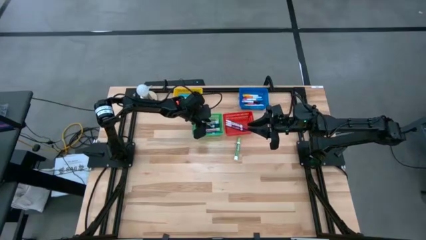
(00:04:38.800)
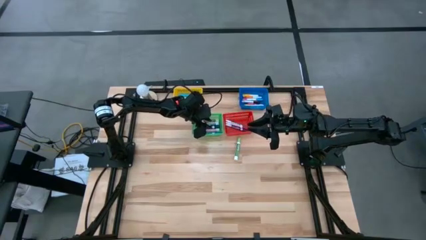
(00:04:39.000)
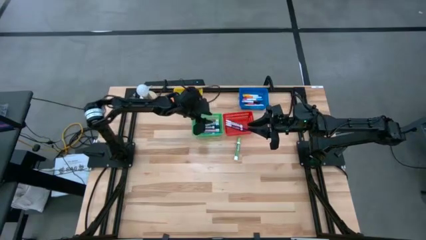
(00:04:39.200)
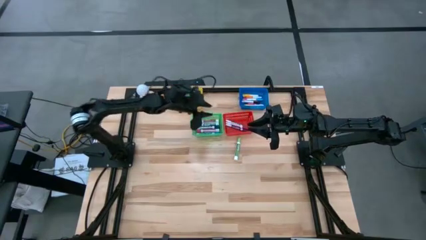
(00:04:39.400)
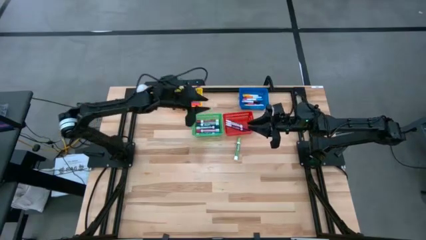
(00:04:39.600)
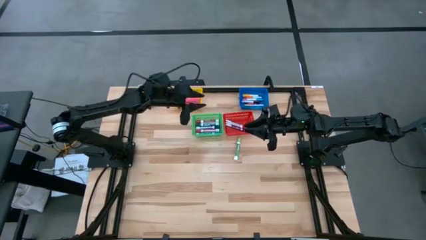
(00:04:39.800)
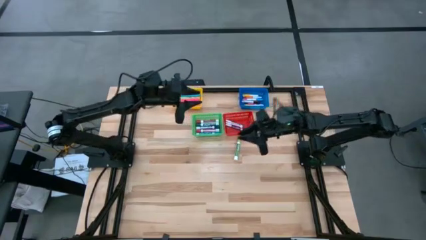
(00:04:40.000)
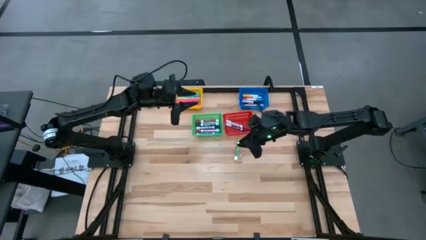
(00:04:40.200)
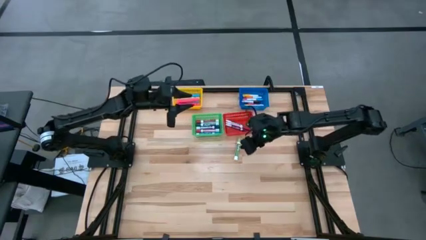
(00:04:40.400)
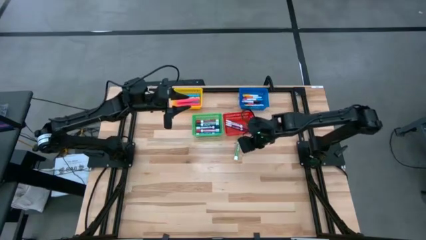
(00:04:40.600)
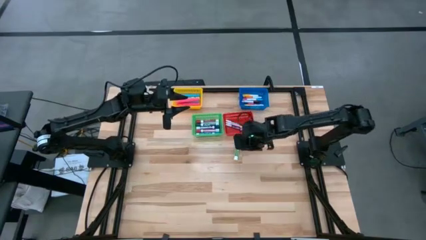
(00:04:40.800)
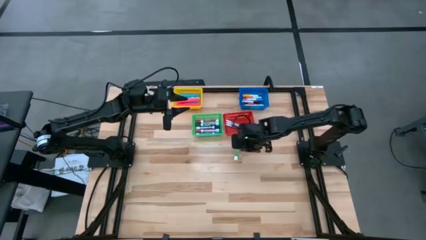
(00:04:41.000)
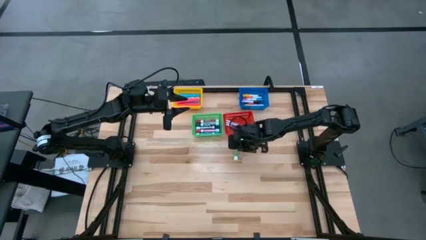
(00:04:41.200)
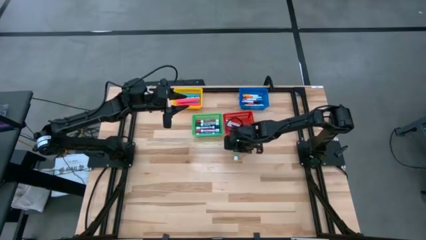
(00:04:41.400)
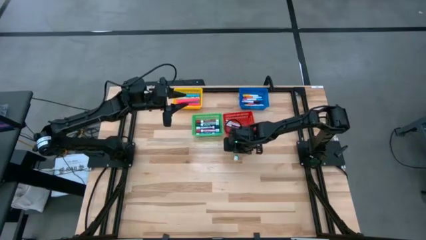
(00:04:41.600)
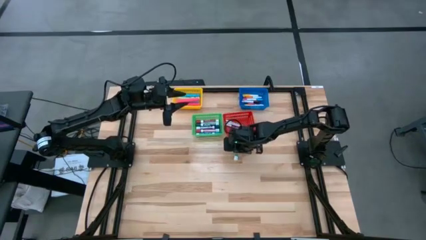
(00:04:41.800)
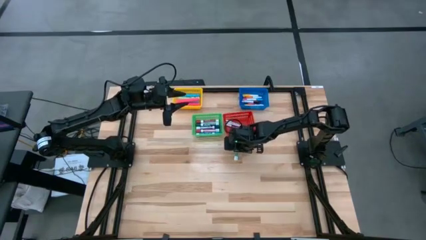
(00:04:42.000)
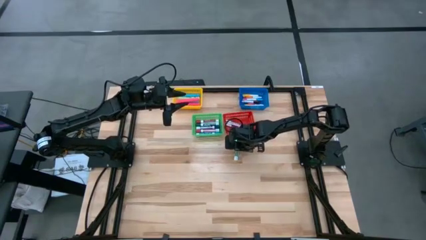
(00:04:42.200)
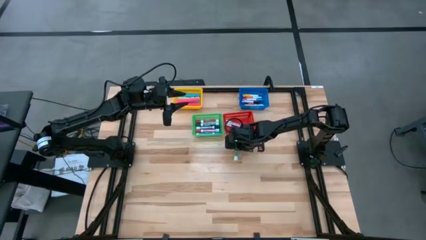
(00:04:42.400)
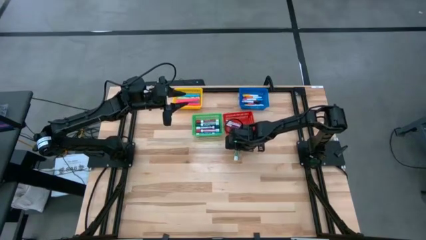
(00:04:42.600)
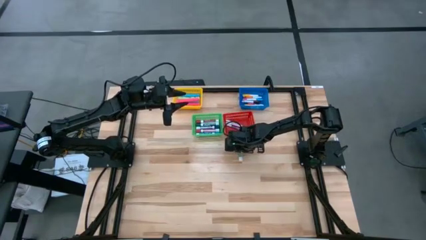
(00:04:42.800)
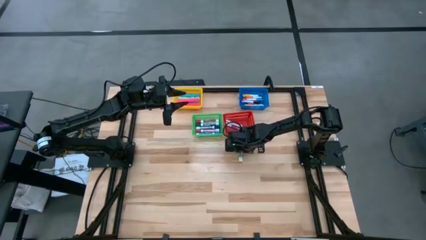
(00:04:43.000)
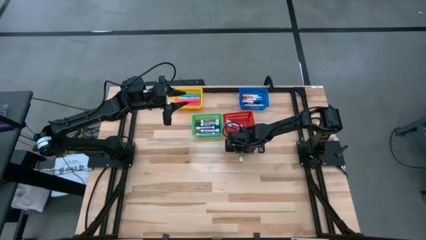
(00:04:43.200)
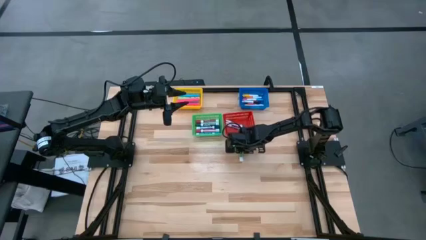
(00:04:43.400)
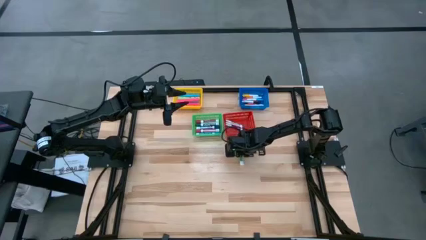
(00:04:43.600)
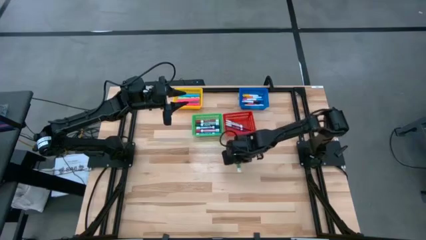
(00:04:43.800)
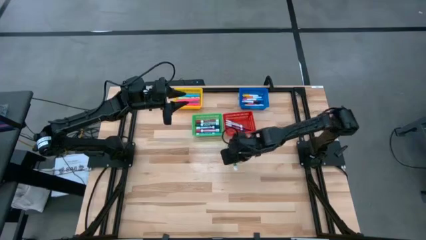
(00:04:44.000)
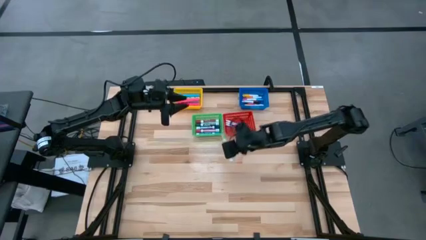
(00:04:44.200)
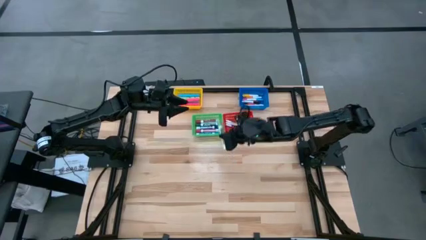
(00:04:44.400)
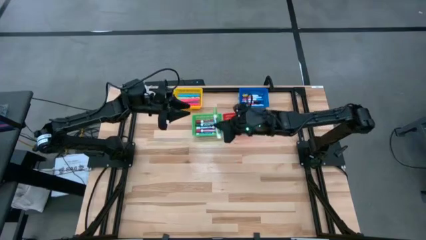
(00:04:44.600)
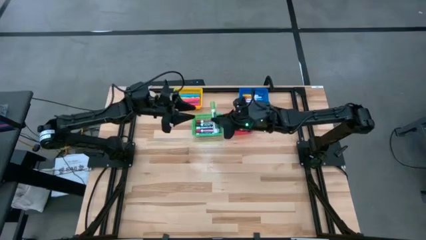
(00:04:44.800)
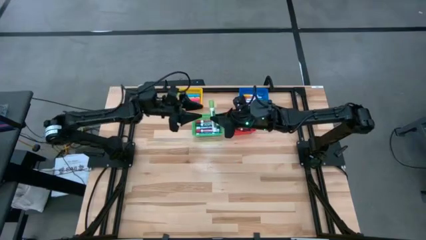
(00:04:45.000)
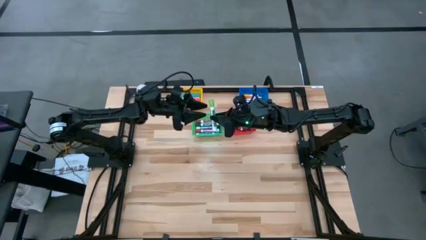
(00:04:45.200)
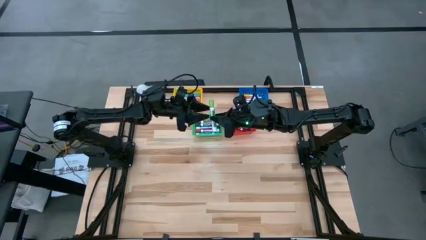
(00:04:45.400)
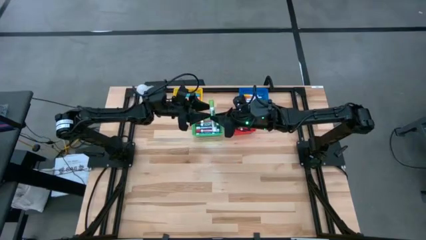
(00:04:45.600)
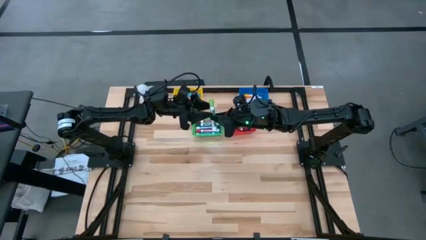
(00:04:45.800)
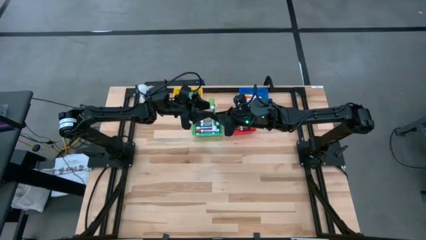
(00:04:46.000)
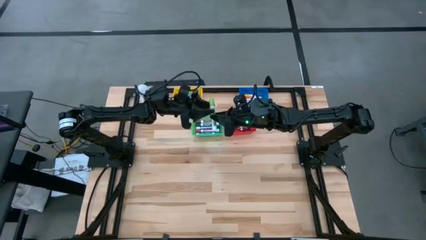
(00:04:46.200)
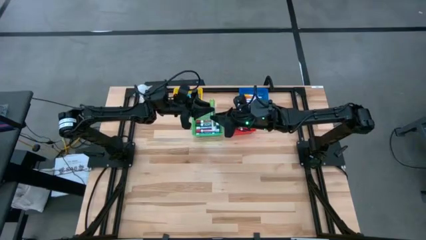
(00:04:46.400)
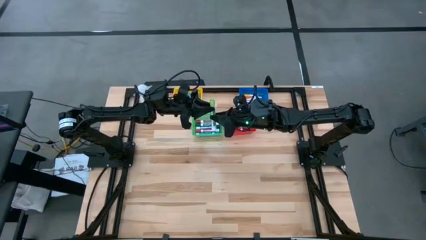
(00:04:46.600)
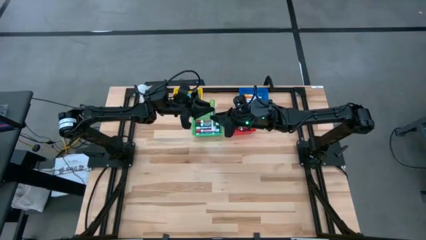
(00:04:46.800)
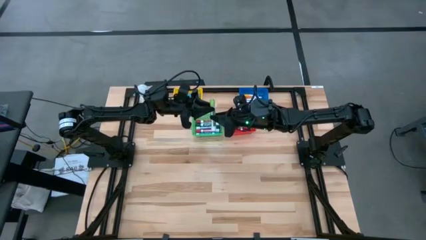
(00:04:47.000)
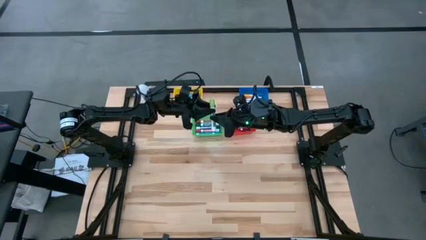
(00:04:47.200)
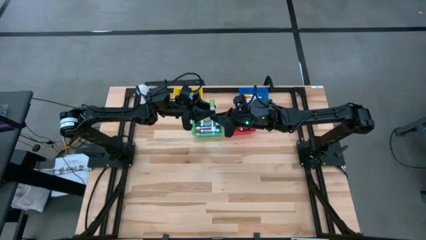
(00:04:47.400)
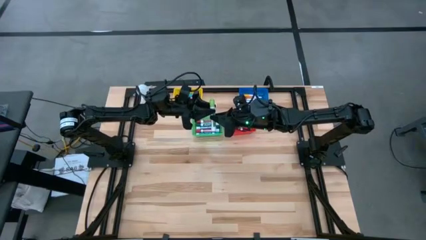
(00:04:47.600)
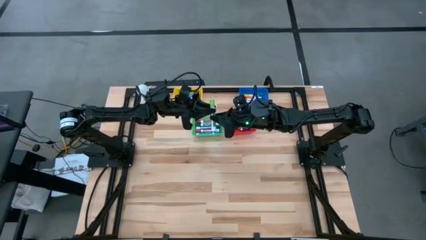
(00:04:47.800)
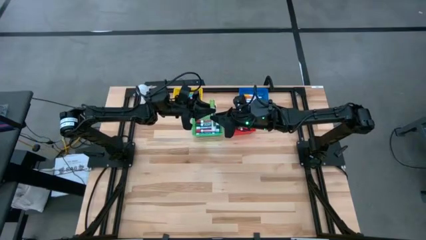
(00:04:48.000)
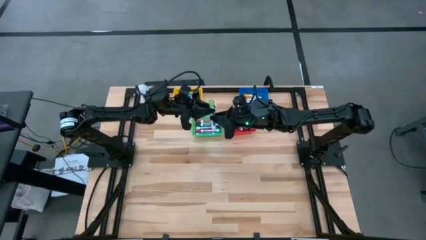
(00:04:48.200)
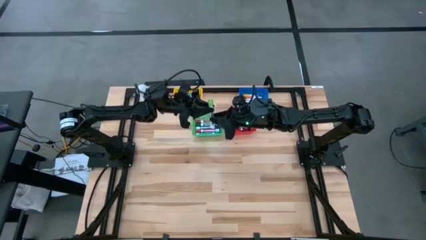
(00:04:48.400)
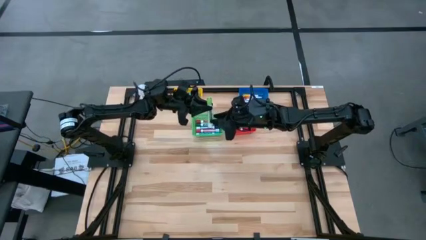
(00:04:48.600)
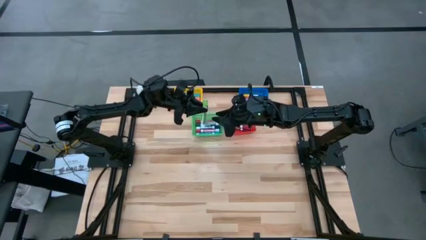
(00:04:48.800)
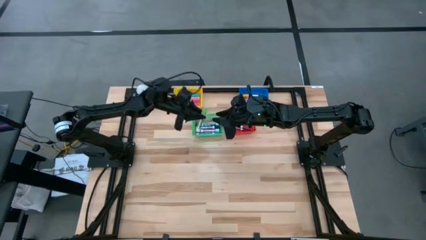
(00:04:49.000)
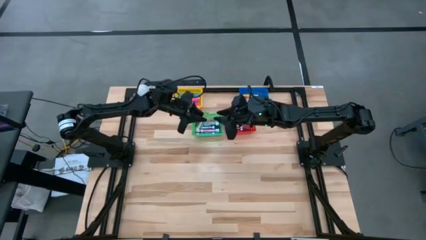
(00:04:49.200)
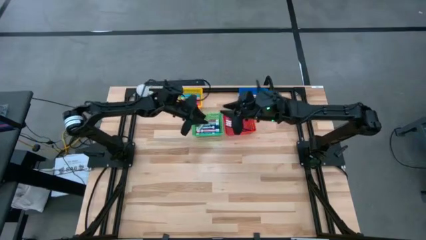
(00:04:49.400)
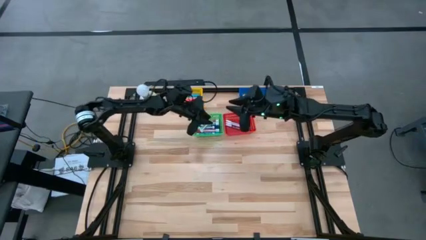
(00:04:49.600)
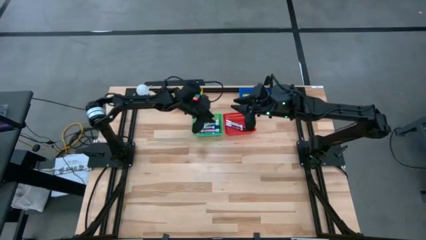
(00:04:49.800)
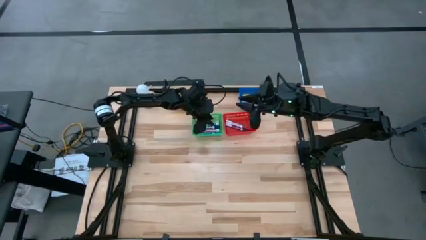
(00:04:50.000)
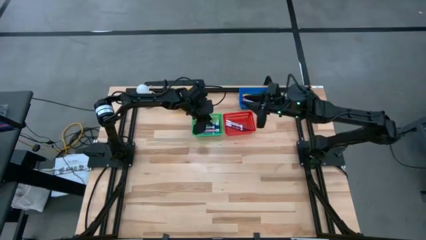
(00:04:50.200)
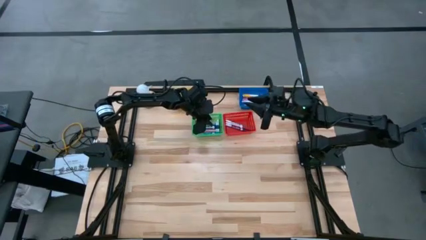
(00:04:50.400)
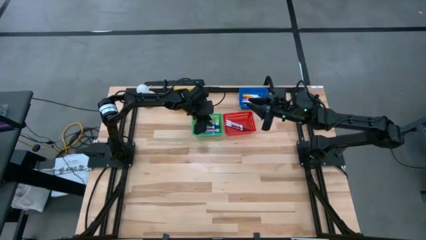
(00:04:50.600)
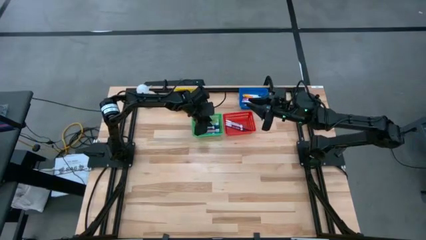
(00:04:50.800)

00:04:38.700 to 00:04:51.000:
Task: Pick & Place Markers
Put the large light green marker into the green bin

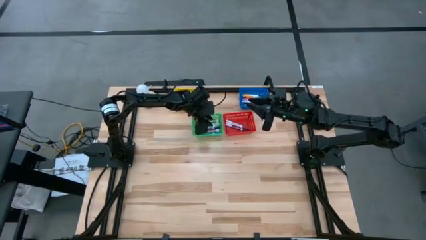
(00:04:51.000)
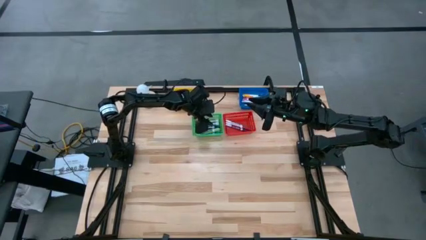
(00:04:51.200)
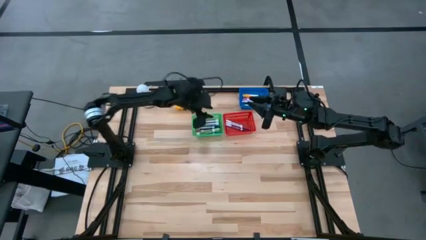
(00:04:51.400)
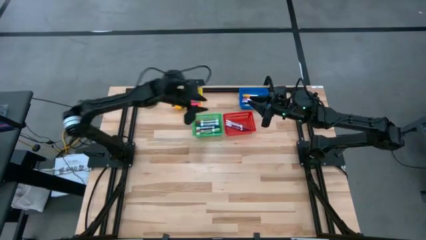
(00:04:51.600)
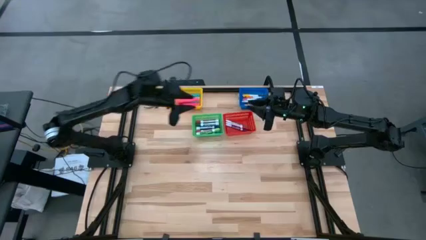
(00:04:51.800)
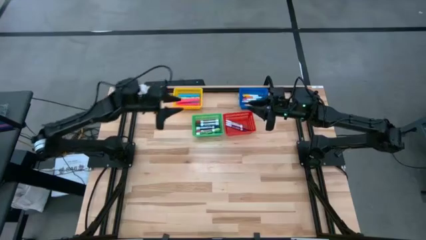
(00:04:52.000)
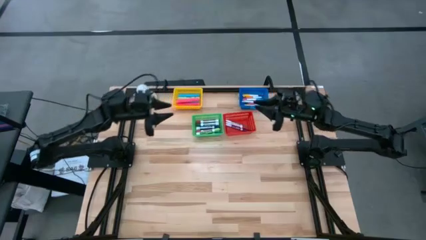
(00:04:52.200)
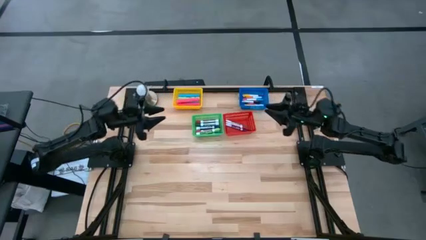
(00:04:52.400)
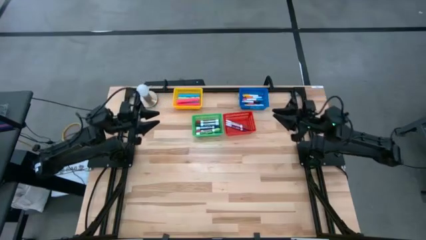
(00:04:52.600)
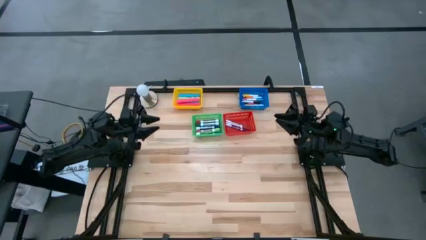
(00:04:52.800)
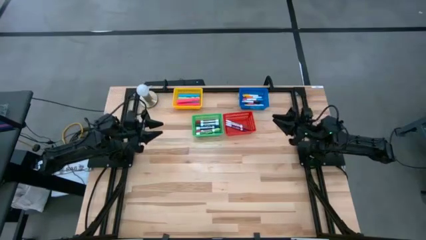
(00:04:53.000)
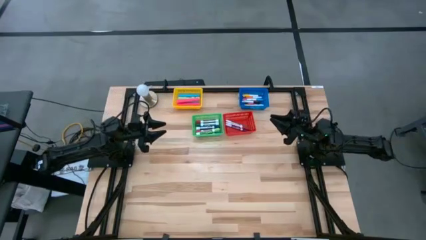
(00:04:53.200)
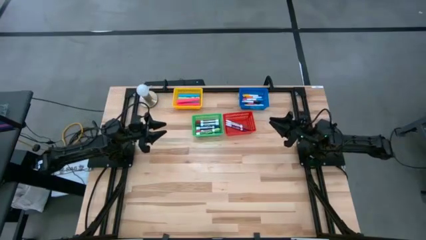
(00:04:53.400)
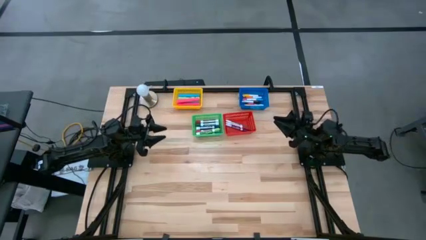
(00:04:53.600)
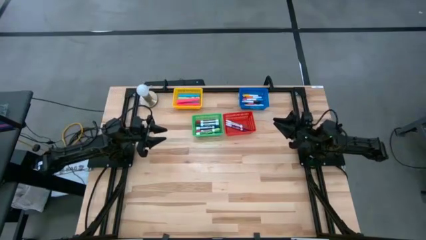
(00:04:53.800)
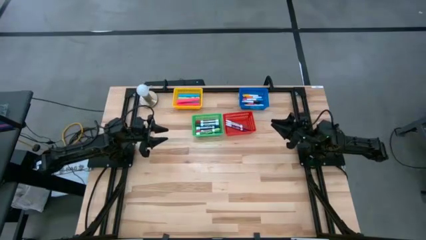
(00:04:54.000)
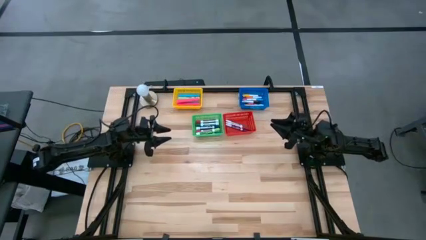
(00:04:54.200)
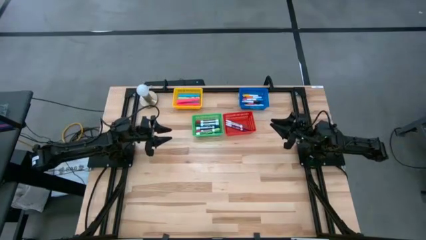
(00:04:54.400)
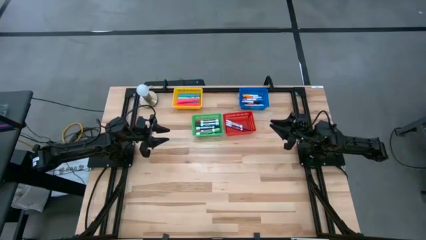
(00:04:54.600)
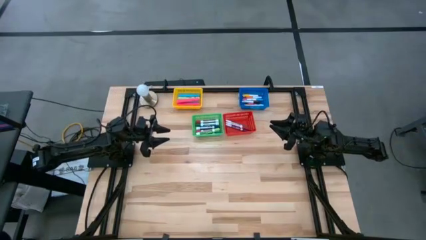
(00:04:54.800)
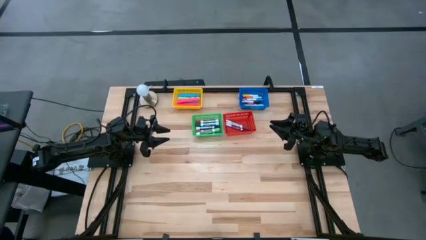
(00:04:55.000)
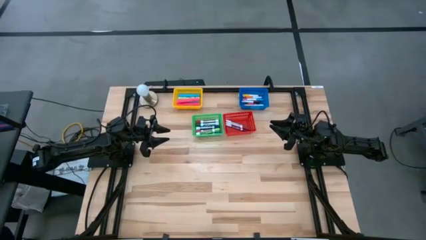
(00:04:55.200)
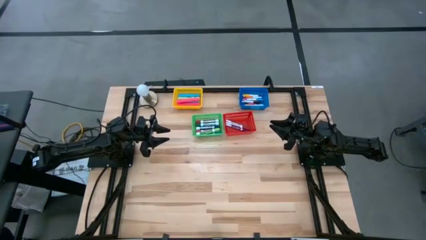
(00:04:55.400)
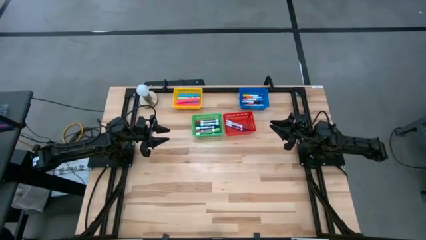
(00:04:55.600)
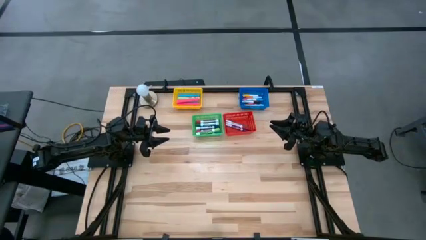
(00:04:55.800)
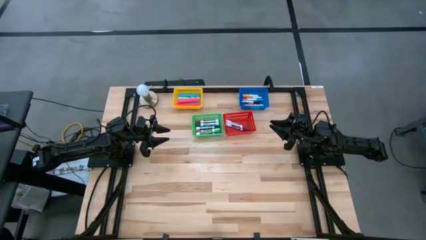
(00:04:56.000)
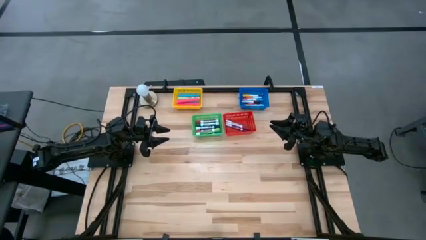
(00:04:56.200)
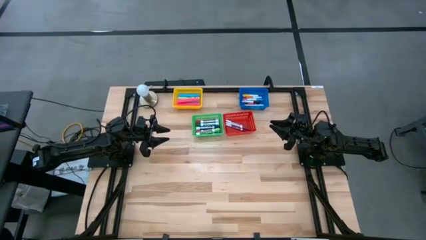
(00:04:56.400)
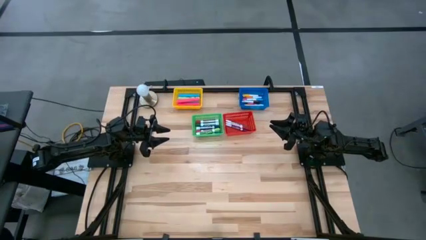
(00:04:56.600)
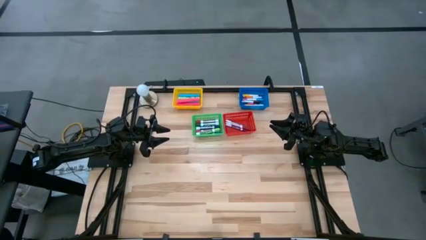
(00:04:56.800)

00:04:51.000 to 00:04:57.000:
Return to Home Position
